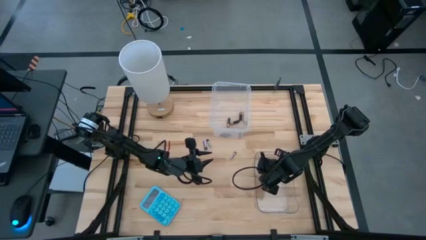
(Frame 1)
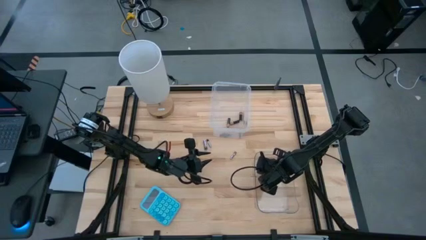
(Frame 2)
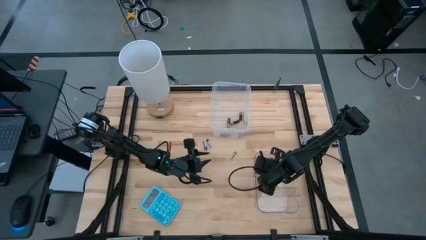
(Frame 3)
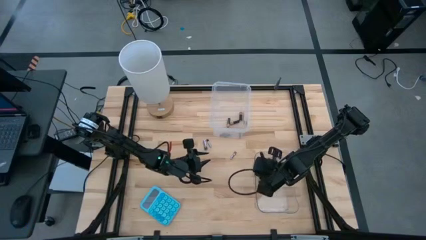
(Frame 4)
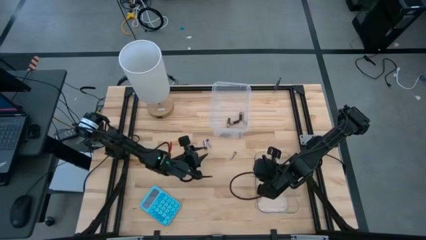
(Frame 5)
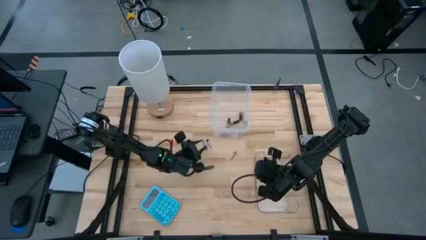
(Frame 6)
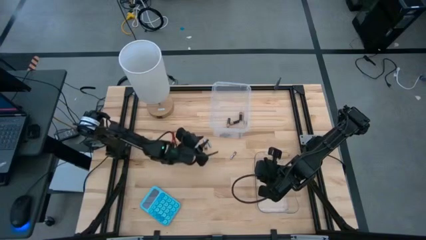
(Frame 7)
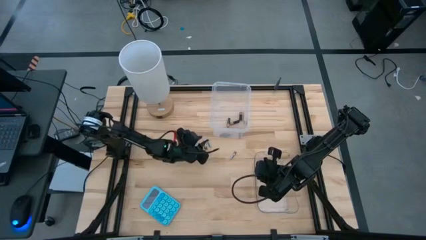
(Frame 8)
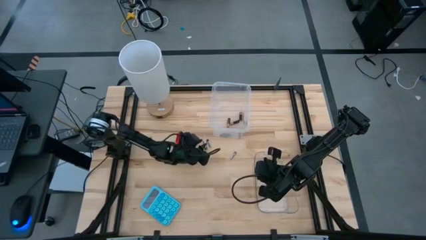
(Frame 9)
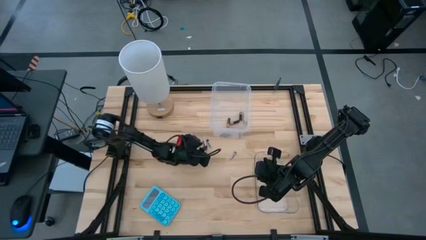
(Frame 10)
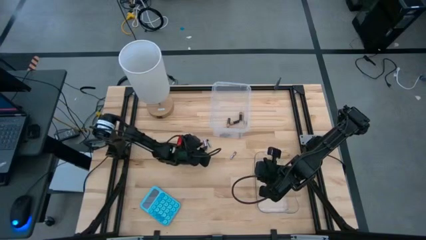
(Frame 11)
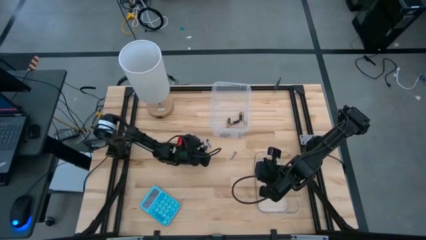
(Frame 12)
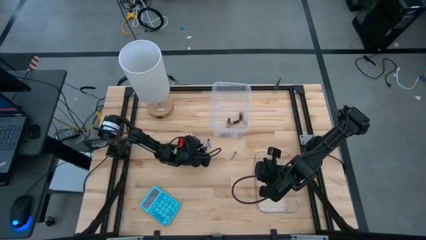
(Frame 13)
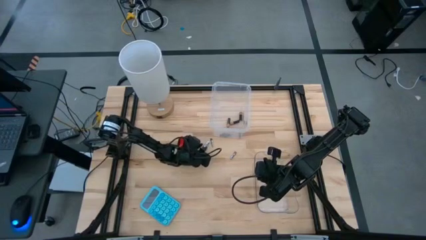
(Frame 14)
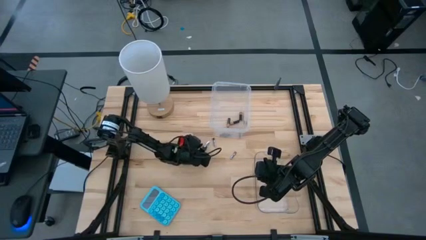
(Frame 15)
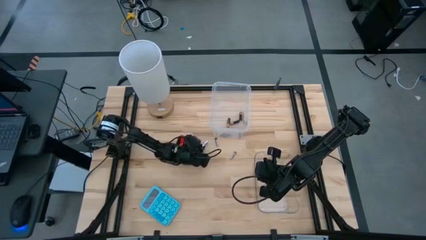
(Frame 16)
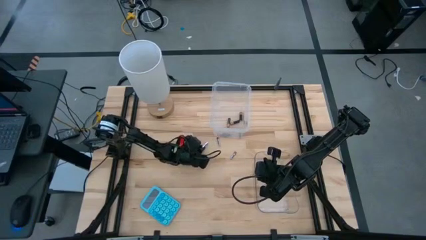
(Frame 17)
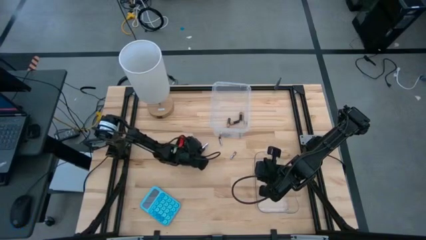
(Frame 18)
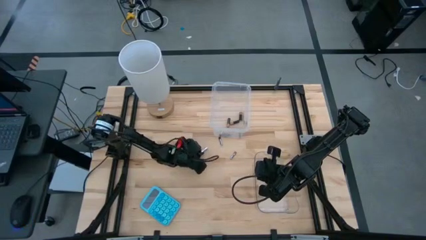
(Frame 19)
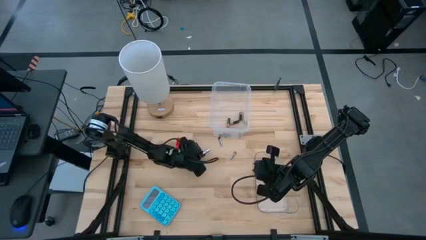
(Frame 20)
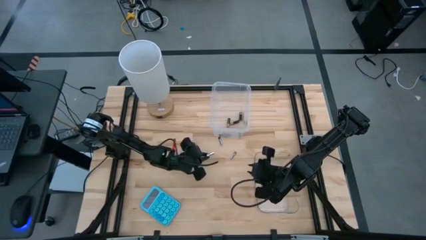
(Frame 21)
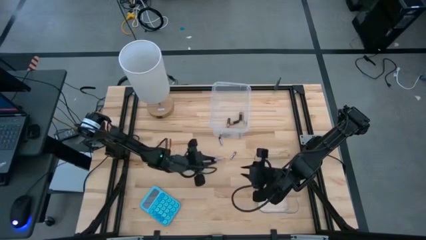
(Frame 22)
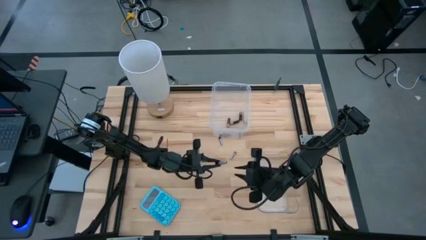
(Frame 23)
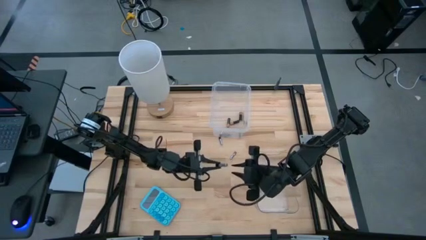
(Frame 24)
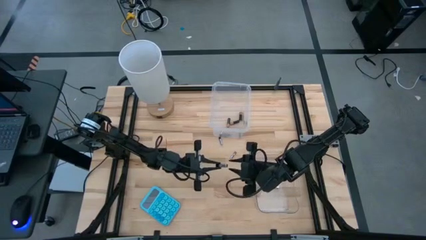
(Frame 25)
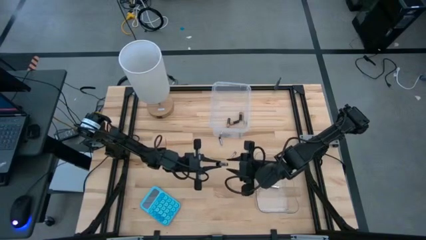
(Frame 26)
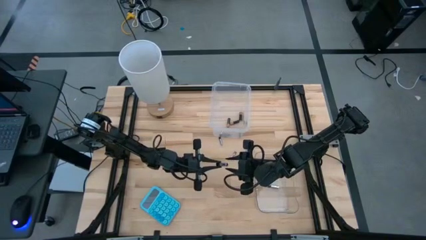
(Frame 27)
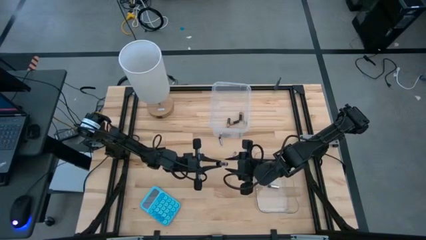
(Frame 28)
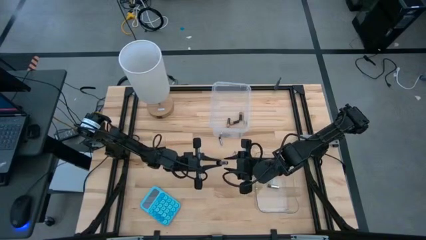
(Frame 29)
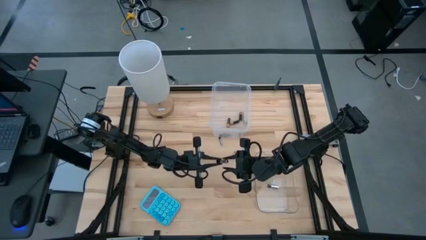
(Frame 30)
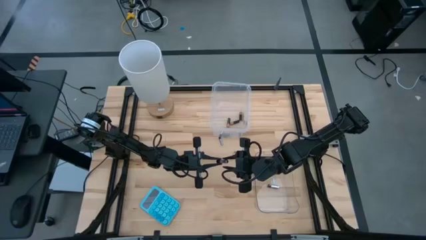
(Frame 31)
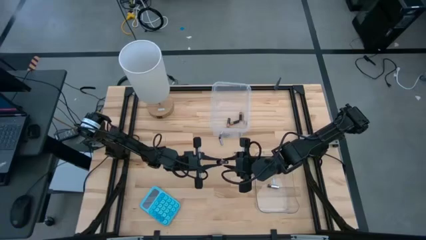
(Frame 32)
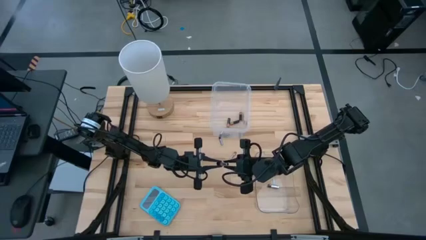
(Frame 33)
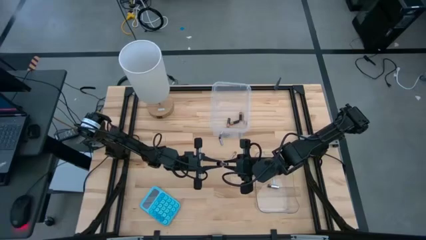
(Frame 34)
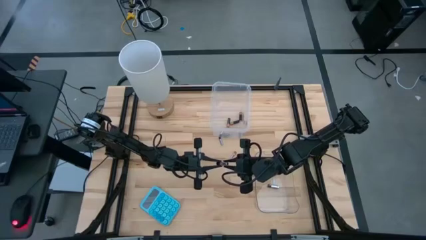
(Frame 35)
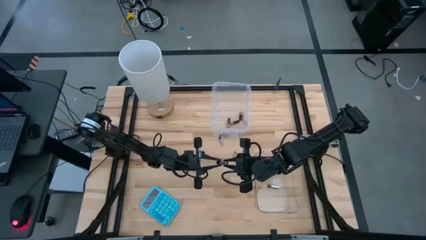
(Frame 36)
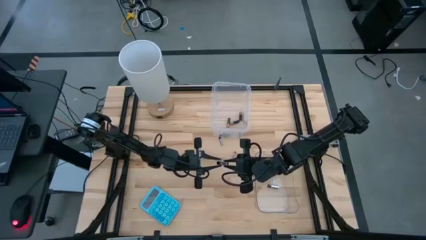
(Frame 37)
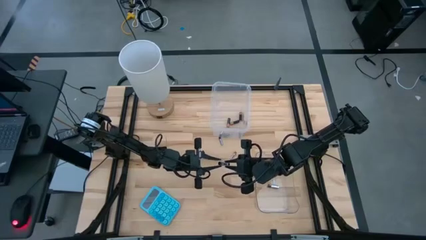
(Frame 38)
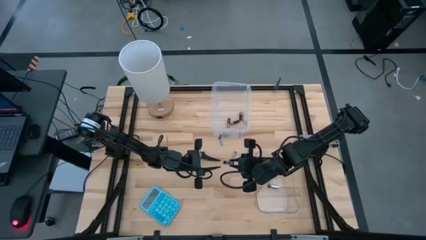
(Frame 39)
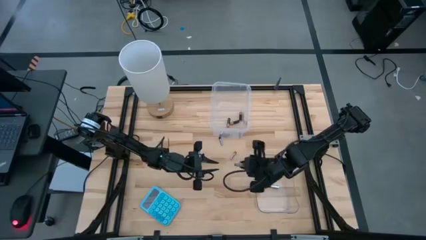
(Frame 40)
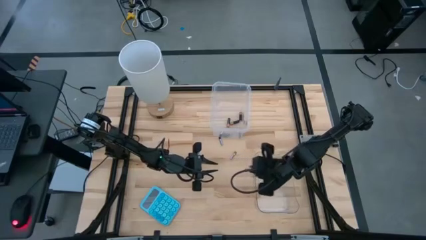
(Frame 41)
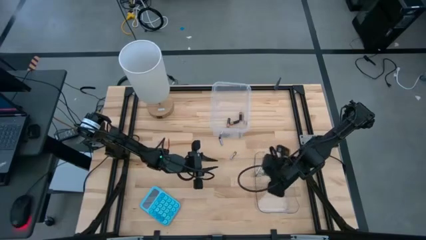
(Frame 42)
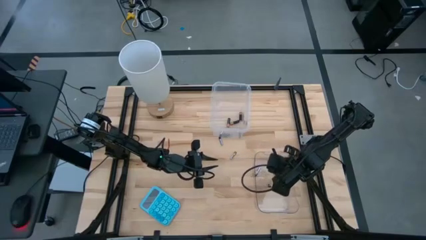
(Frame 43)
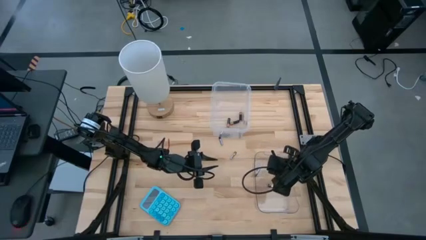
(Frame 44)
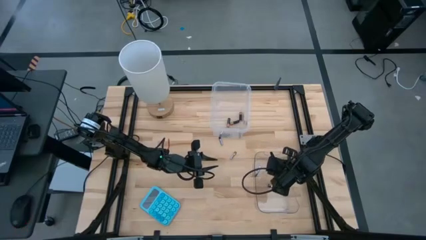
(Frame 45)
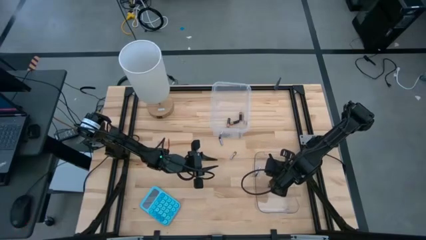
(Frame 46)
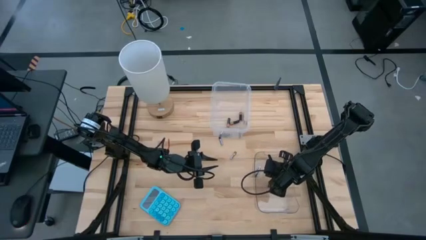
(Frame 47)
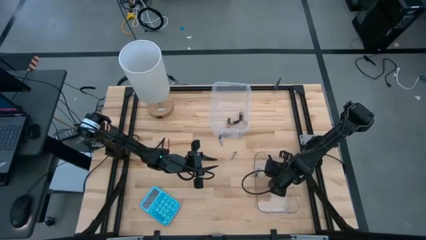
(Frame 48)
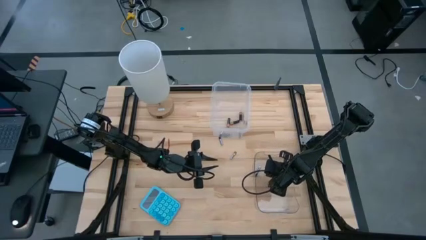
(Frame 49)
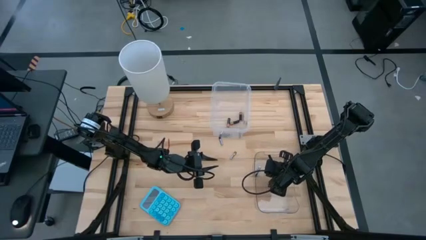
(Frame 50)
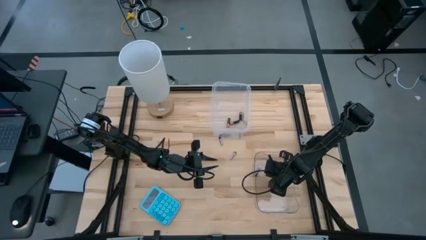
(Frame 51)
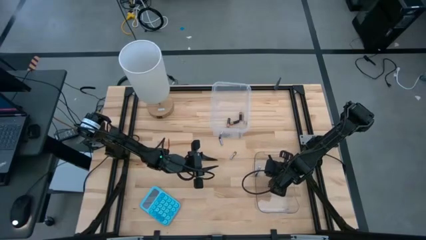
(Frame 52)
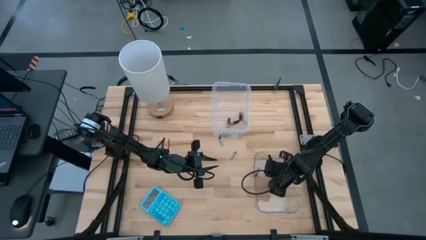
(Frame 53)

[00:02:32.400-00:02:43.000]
Task: Sort batteries
Put the silver battery into the bottom transparent bin

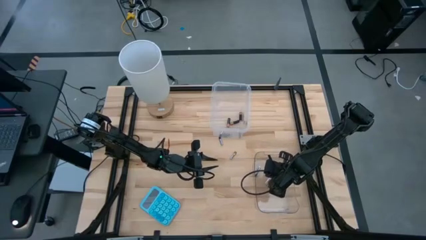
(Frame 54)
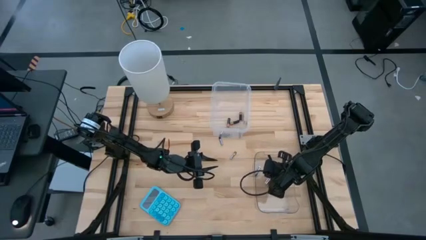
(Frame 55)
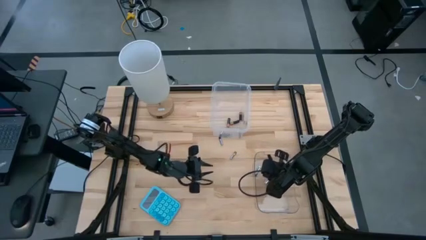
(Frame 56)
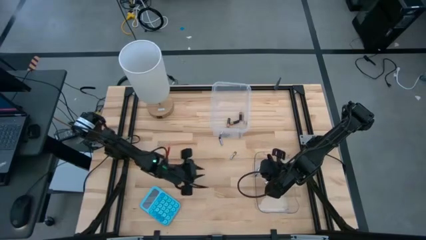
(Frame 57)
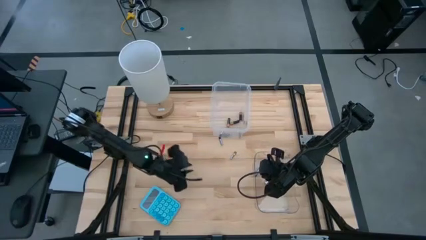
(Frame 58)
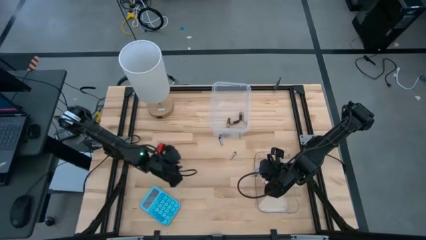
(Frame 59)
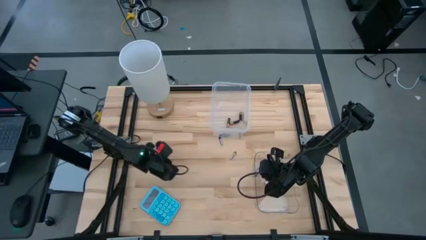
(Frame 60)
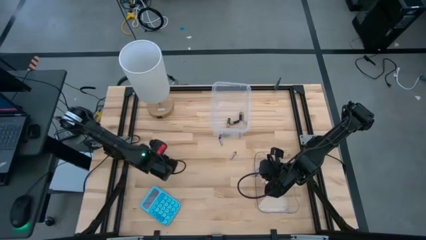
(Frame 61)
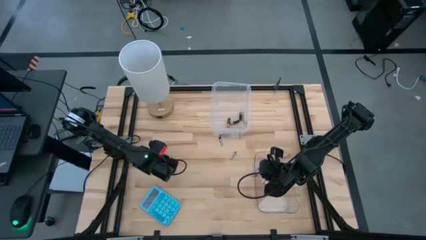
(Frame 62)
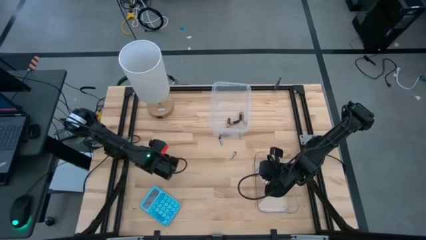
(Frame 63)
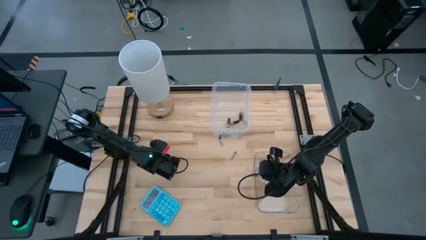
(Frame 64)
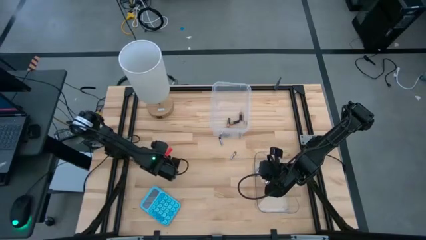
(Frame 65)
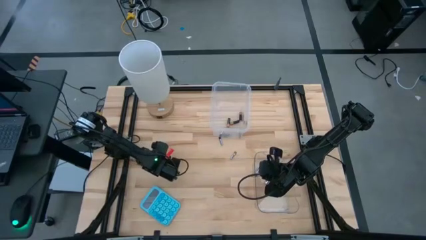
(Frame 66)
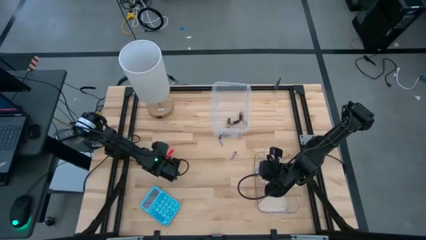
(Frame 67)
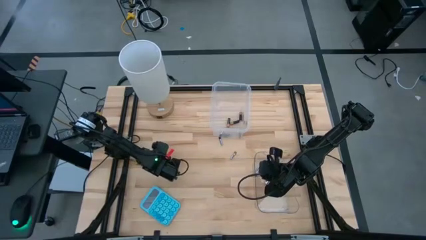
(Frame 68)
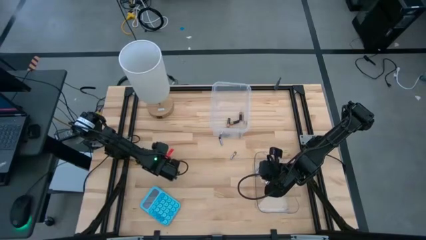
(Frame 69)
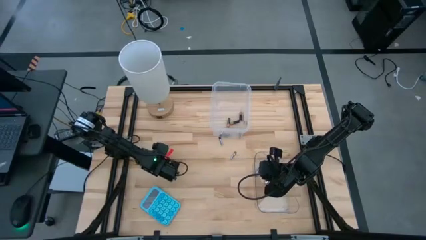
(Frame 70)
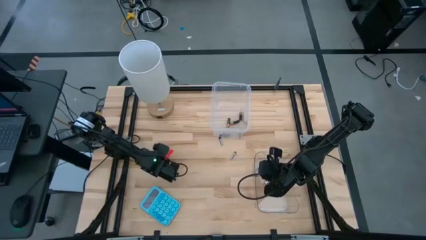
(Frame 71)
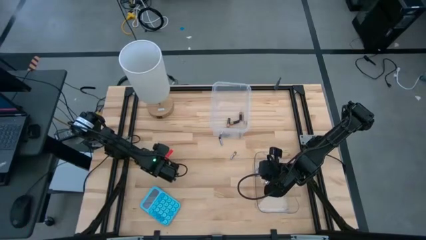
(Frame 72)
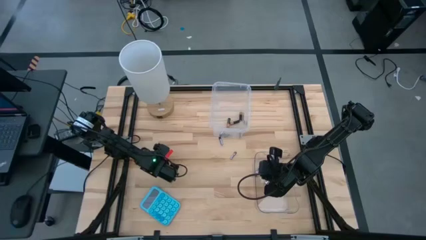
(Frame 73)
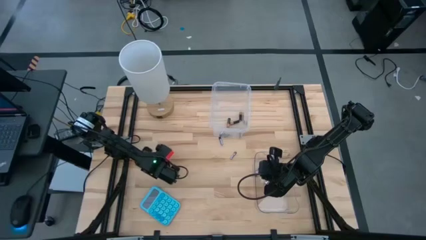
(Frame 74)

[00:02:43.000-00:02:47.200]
Put the silver battery into the bottom transparent bin

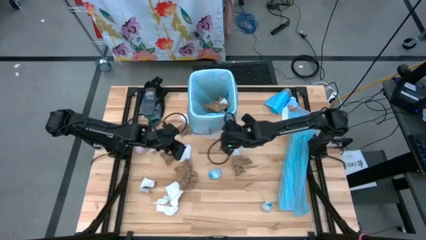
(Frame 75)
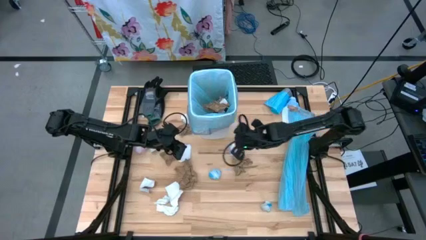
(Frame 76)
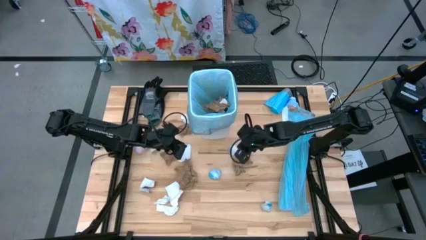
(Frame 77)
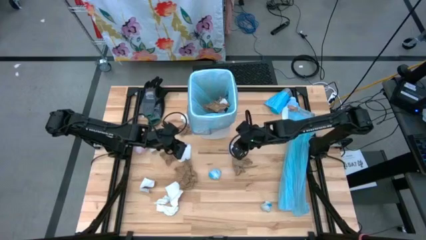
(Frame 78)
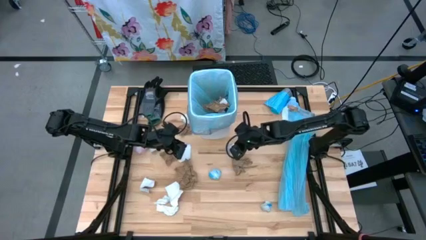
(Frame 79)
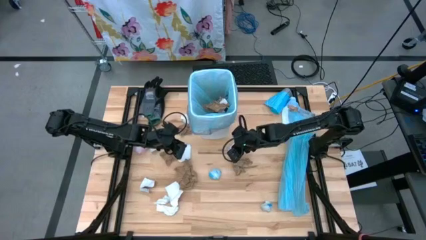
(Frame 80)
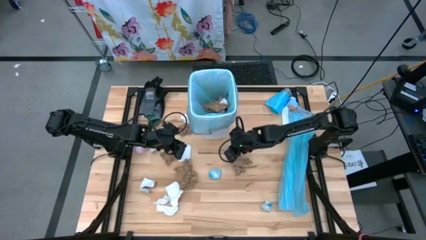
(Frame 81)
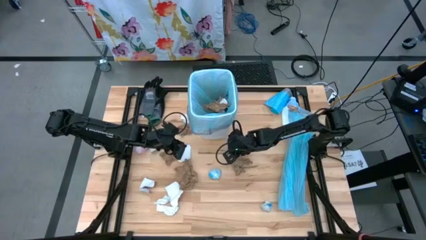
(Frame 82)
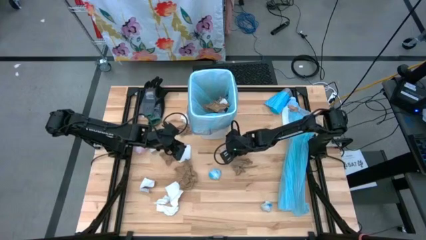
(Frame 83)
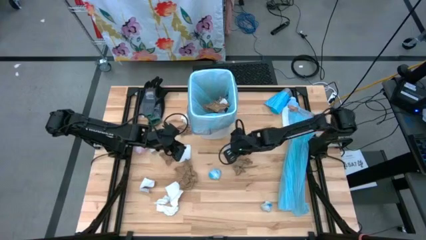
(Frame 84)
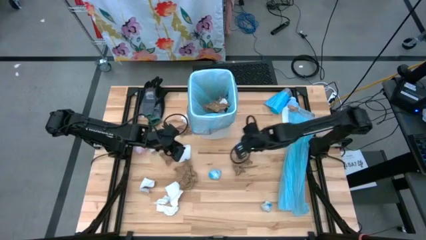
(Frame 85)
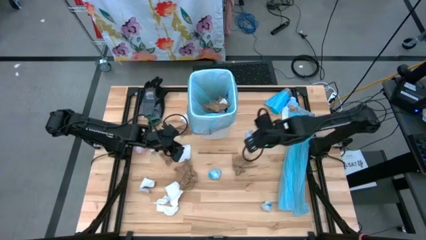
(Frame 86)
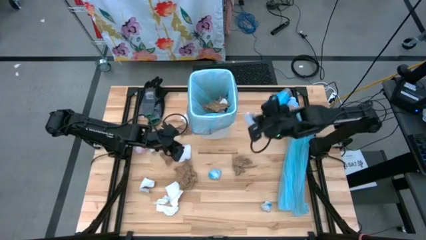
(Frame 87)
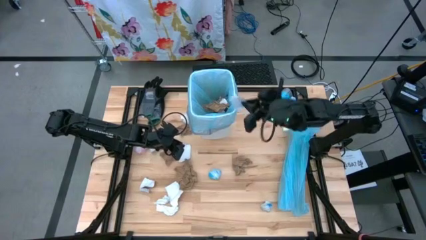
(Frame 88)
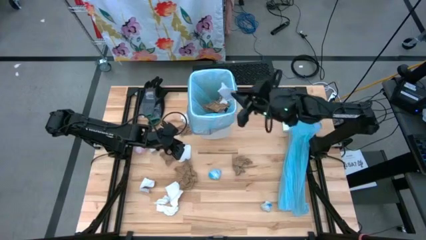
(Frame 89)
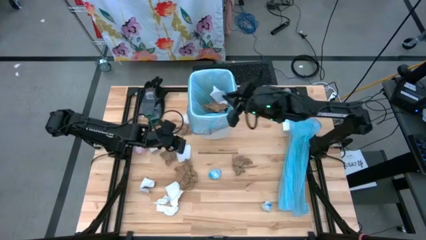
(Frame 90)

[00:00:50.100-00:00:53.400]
Task: place trash/remove bag and relplace
Put the white paper into the trash bin
